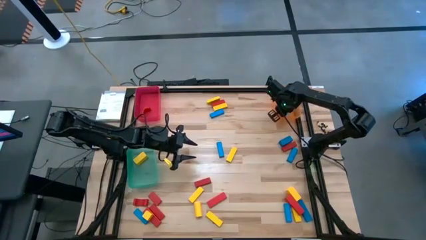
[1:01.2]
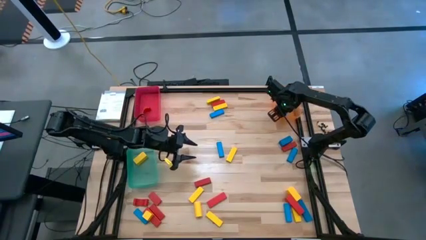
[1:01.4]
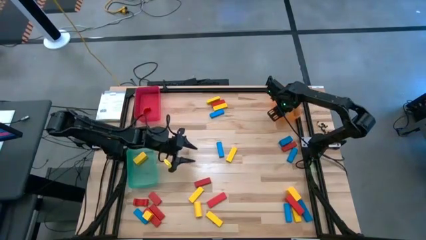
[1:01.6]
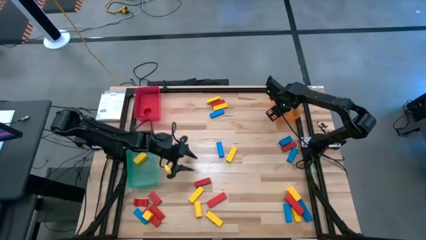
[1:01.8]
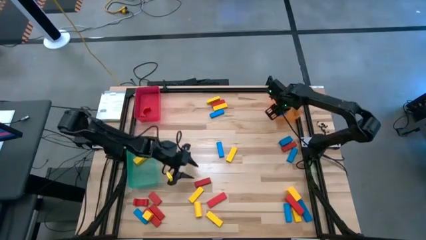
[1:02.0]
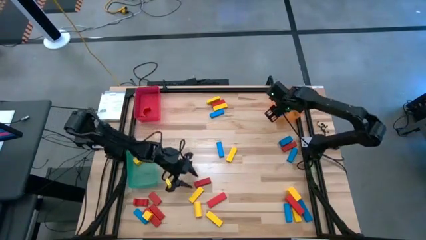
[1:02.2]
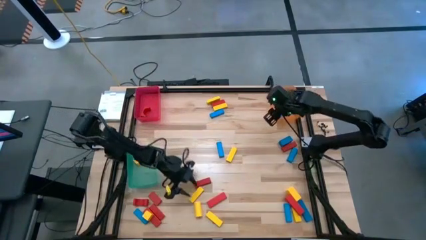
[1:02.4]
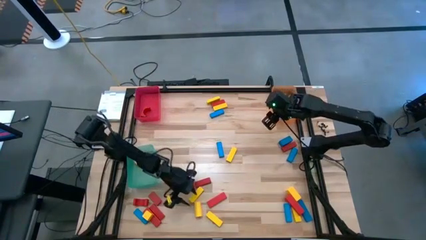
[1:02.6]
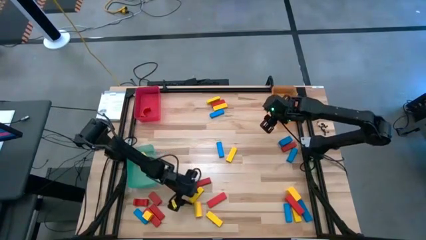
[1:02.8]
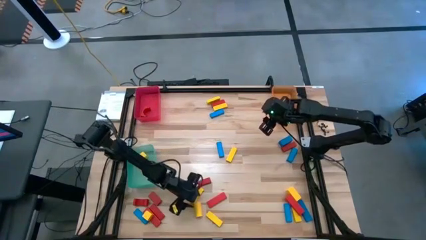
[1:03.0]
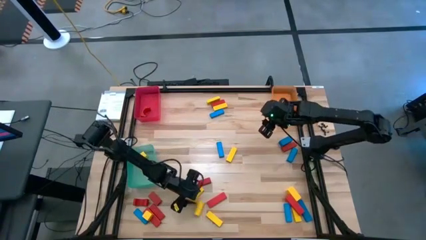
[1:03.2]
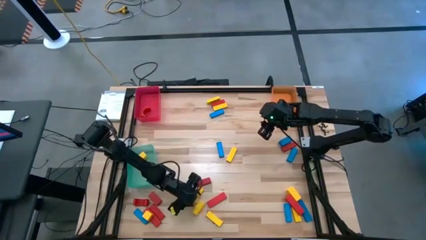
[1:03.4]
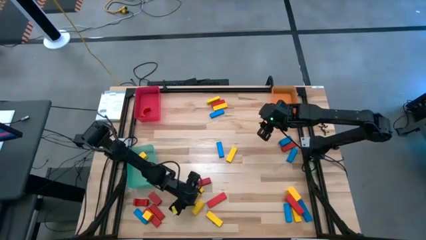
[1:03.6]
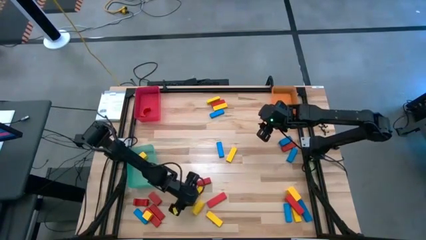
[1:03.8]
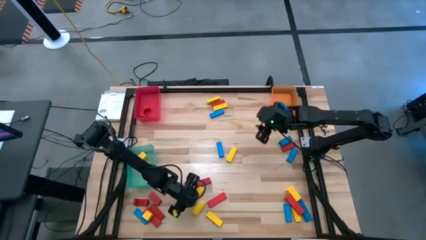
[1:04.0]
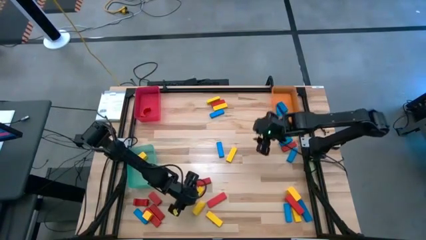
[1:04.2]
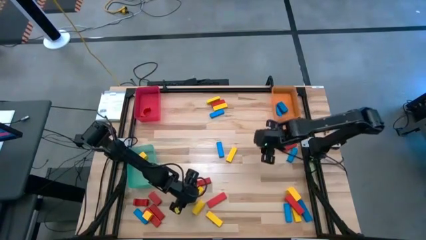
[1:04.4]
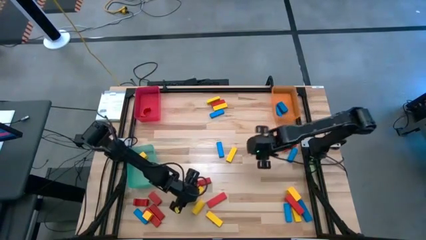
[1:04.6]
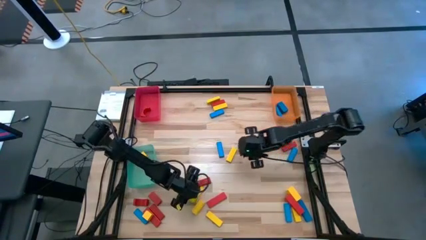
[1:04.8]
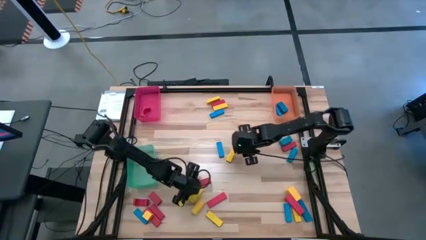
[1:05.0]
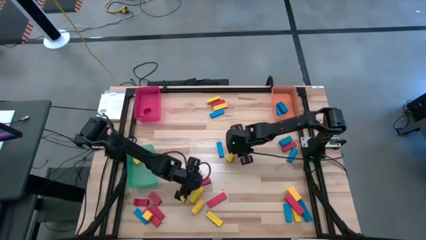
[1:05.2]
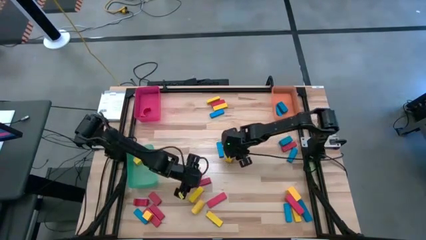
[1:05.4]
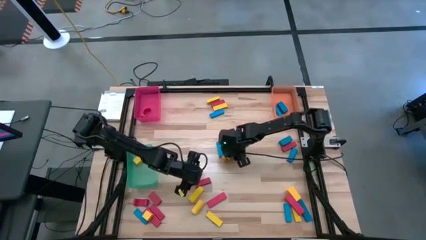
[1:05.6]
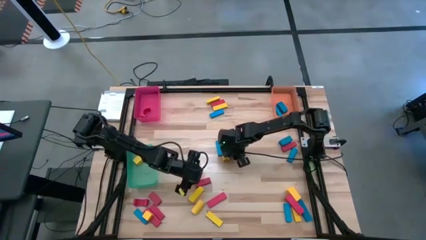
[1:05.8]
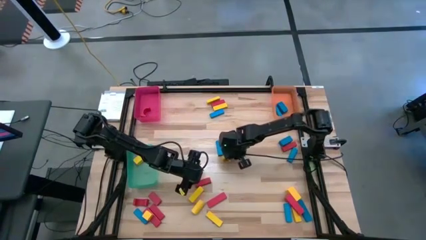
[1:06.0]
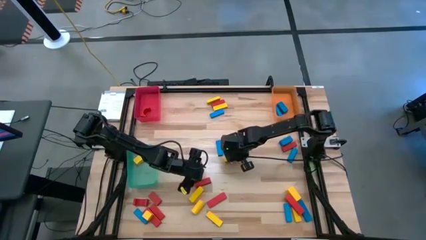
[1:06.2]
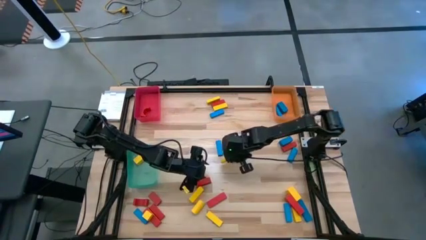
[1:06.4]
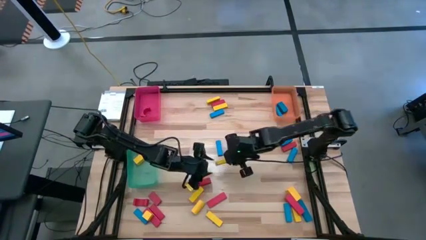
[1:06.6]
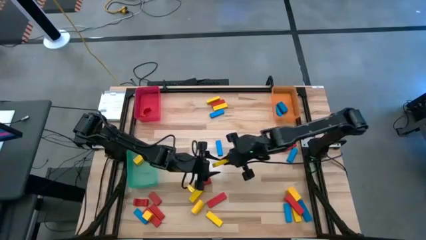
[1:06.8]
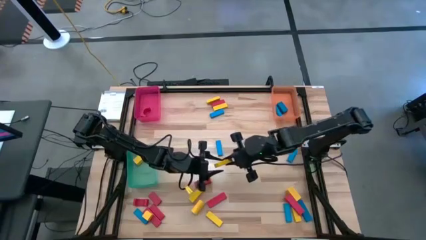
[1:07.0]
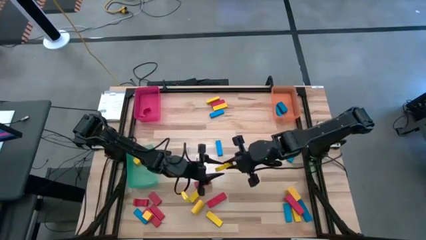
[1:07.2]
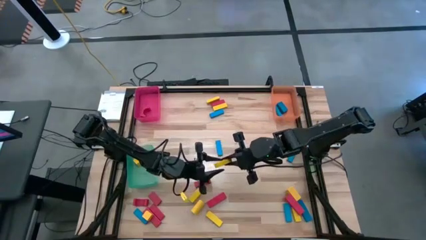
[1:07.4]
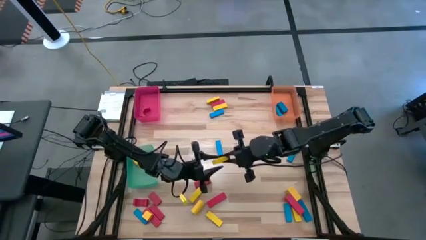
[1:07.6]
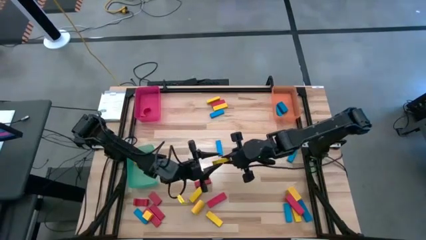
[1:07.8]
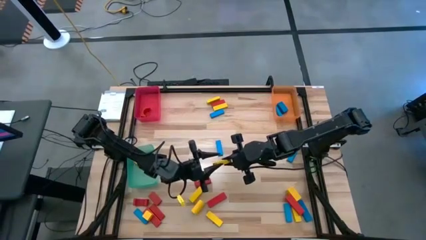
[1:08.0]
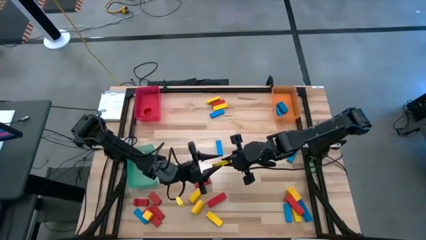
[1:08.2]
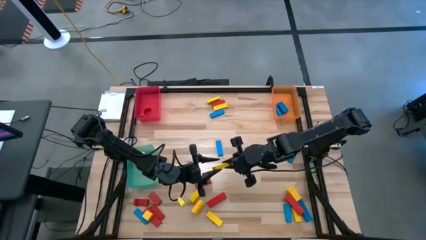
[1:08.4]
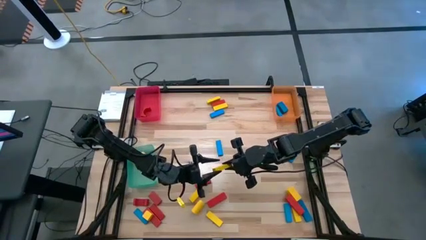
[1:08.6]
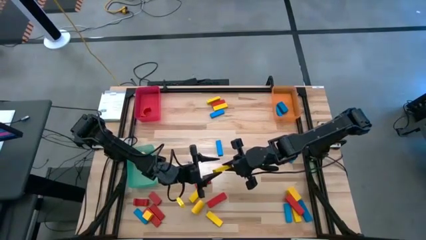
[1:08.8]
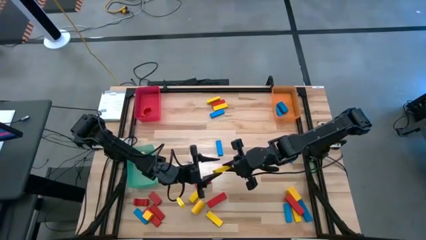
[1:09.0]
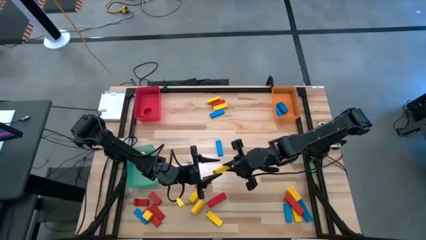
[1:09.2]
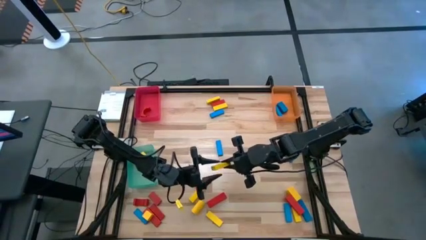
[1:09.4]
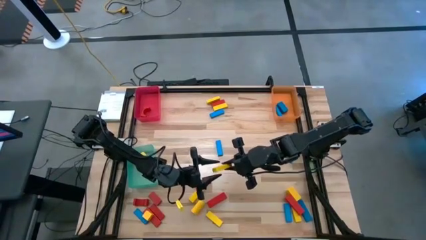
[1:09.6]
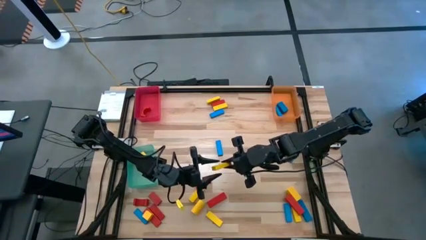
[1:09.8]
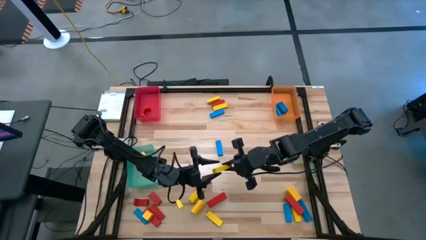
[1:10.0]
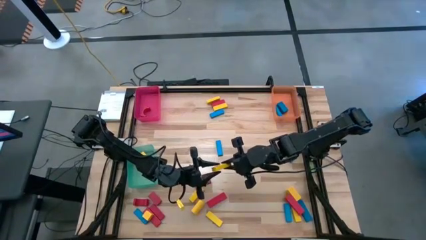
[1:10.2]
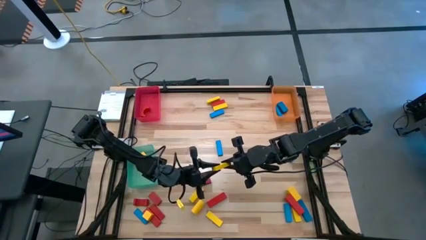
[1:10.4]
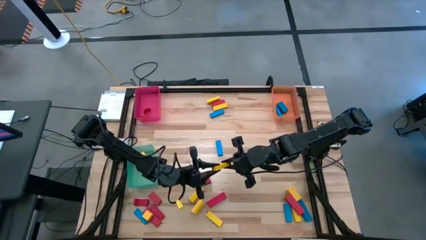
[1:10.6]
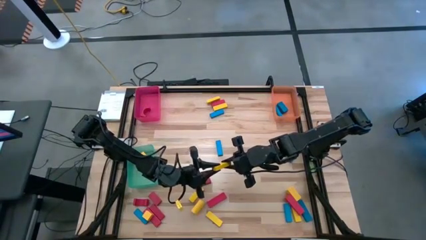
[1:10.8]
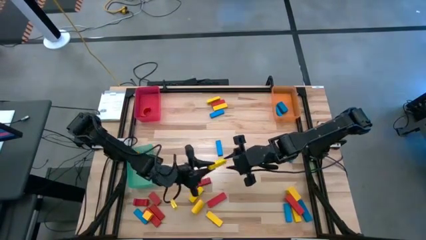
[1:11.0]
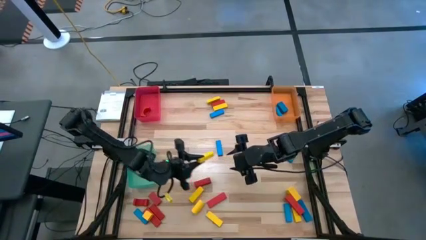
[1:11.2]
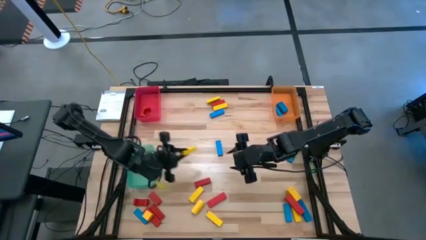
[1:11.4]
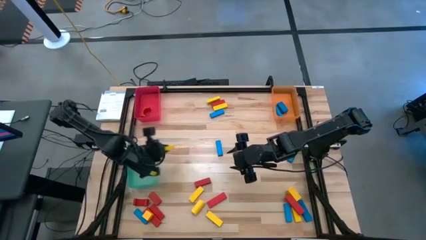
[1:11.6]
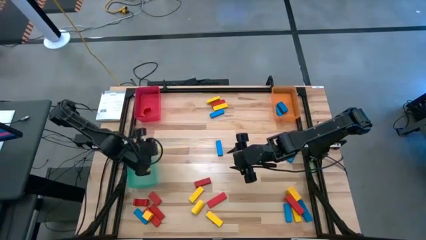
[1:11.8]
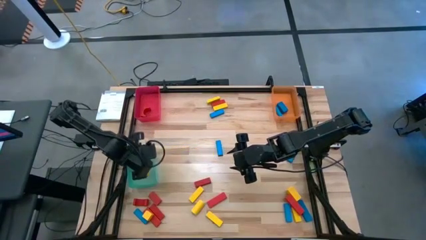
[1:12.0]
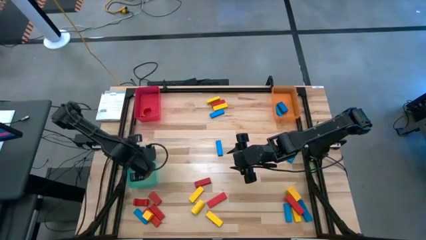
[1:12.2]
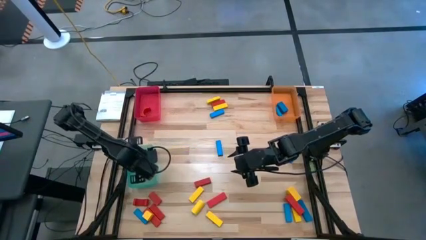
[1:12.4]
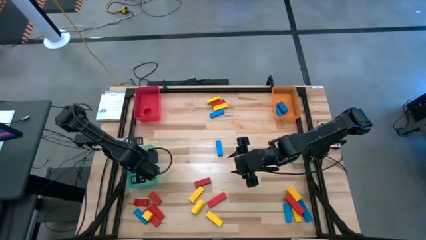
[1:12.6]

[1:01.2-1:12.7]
Task: Sort blocks
Put the yellow block into the green bin
